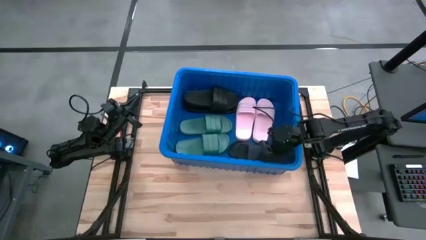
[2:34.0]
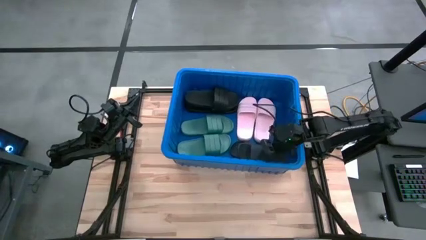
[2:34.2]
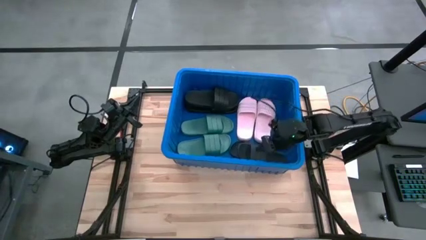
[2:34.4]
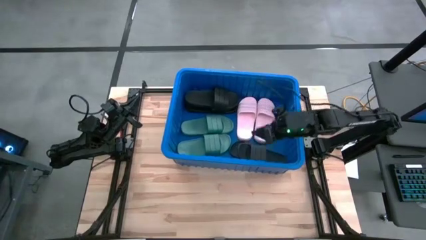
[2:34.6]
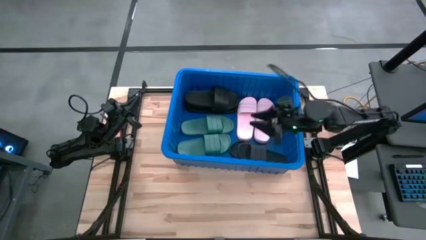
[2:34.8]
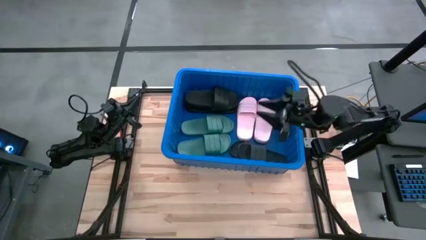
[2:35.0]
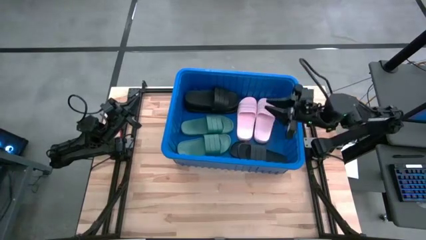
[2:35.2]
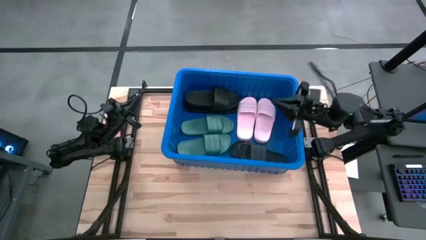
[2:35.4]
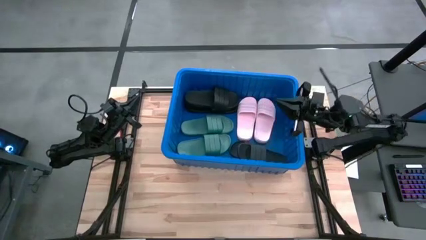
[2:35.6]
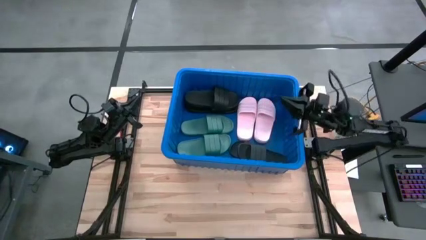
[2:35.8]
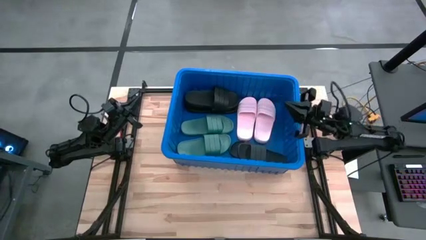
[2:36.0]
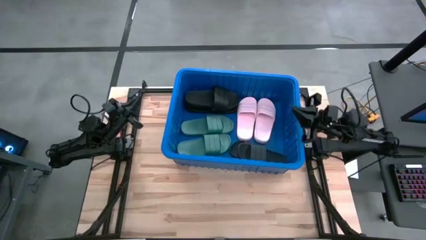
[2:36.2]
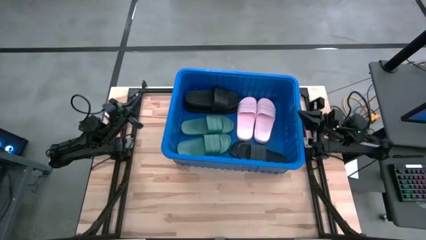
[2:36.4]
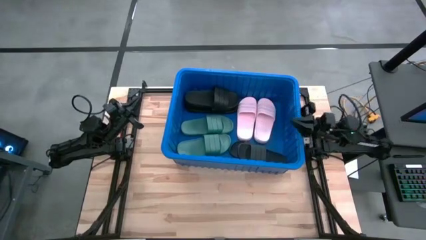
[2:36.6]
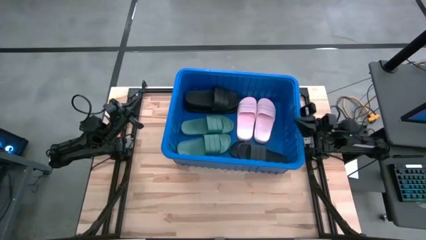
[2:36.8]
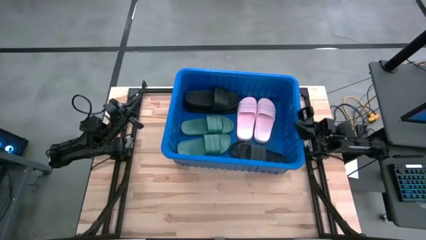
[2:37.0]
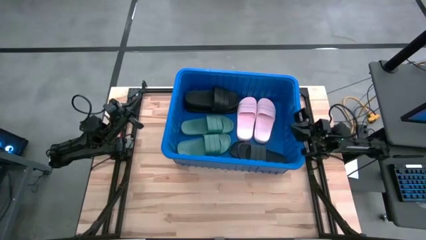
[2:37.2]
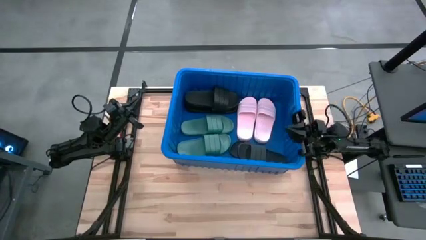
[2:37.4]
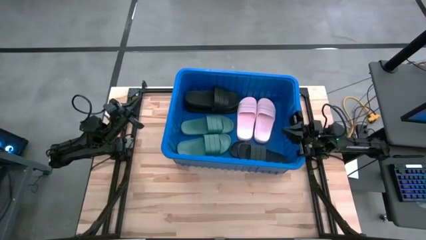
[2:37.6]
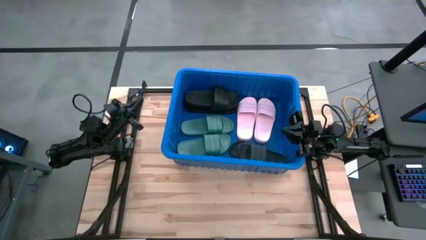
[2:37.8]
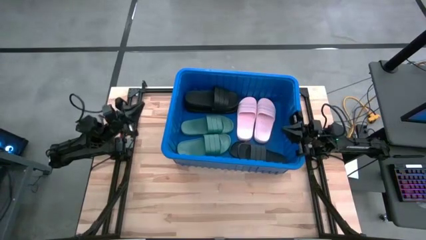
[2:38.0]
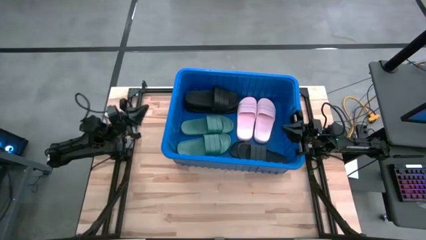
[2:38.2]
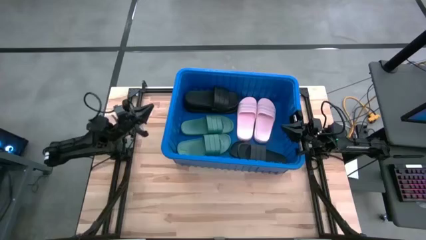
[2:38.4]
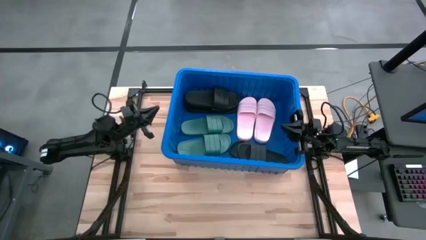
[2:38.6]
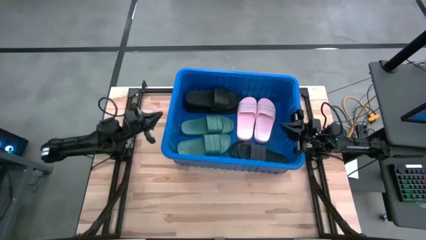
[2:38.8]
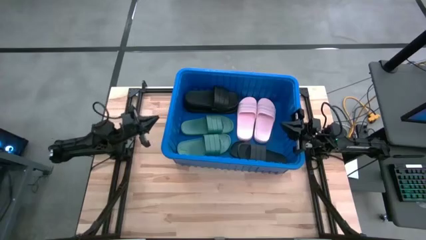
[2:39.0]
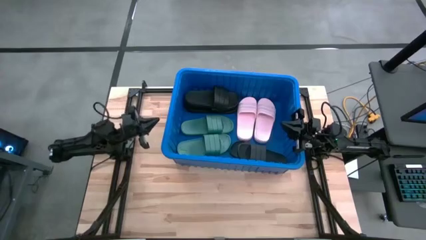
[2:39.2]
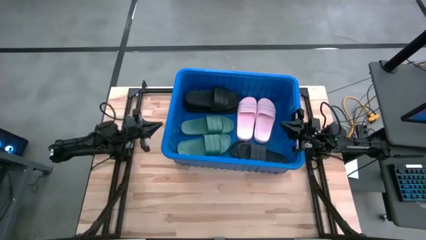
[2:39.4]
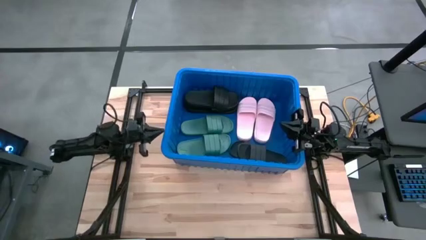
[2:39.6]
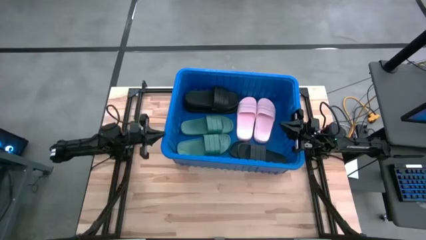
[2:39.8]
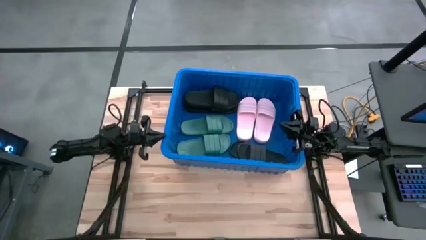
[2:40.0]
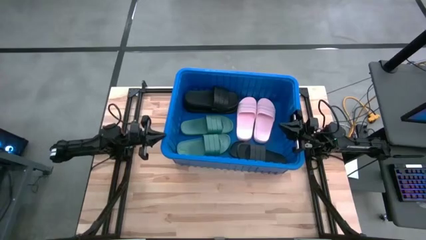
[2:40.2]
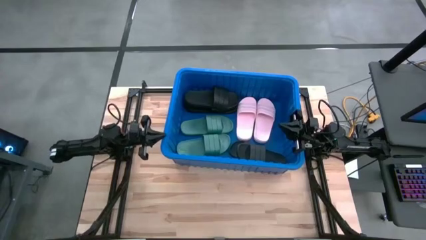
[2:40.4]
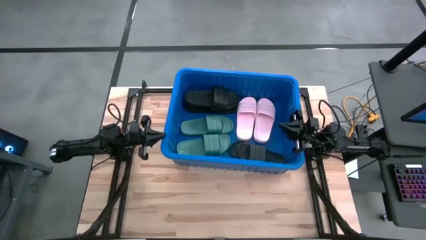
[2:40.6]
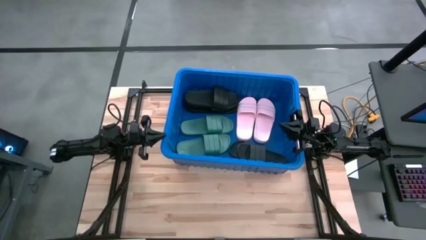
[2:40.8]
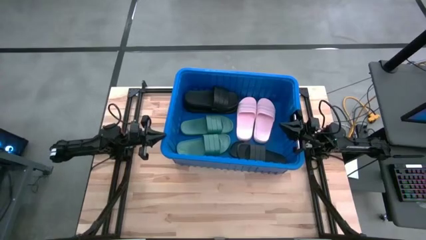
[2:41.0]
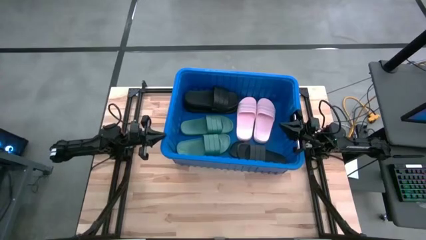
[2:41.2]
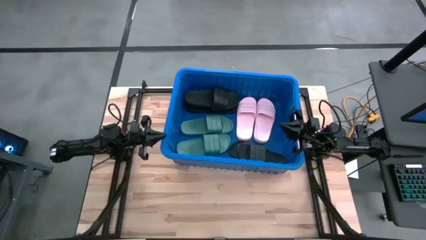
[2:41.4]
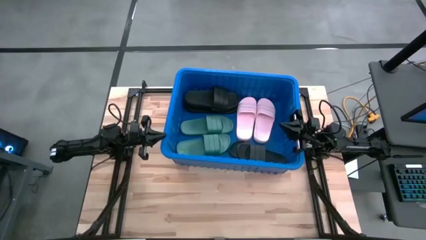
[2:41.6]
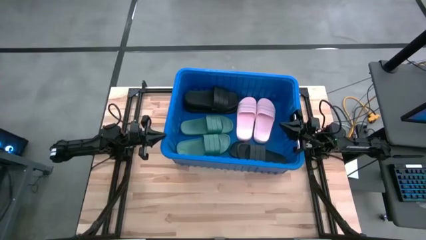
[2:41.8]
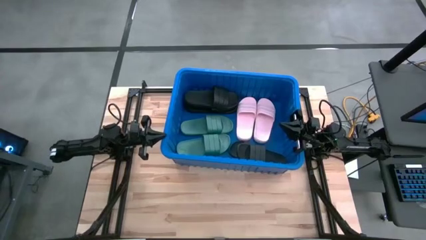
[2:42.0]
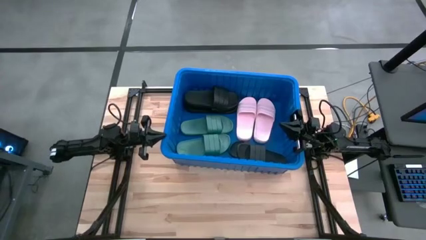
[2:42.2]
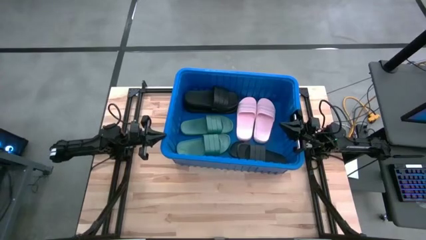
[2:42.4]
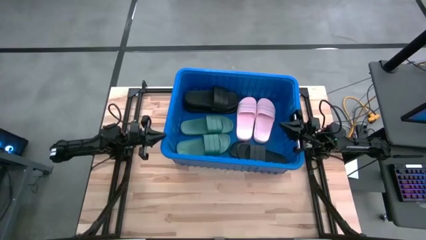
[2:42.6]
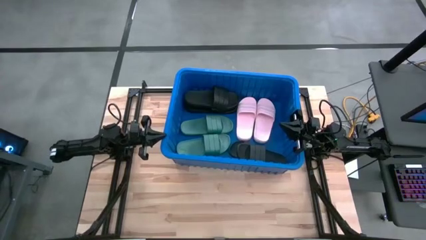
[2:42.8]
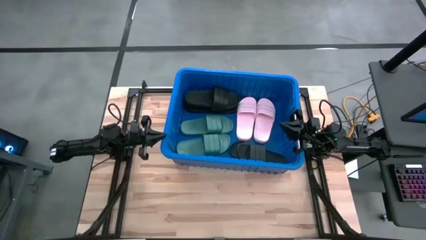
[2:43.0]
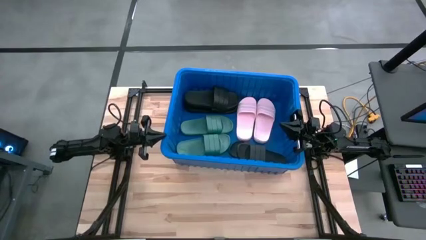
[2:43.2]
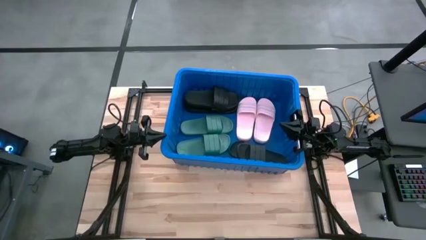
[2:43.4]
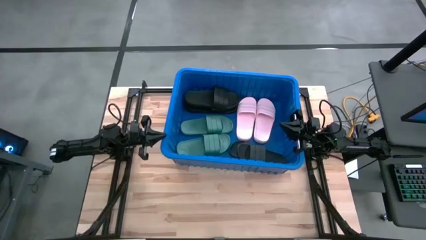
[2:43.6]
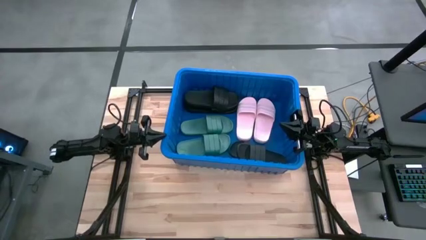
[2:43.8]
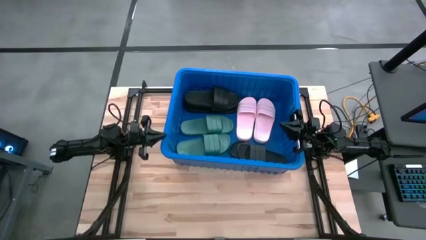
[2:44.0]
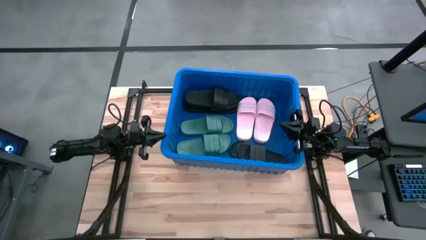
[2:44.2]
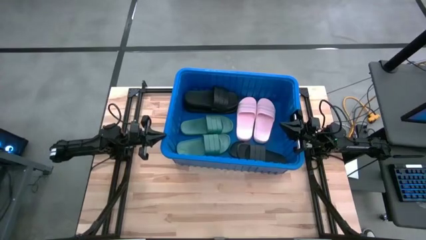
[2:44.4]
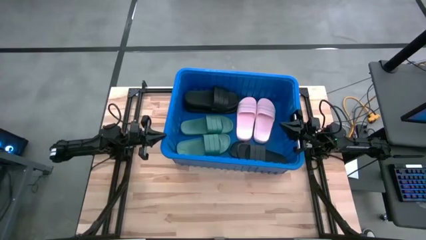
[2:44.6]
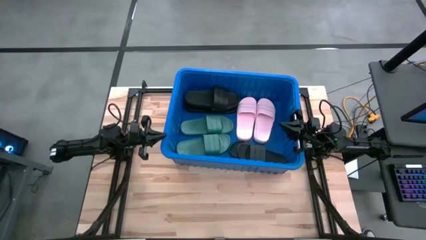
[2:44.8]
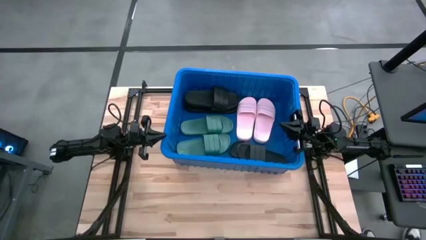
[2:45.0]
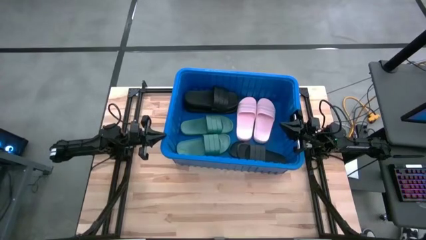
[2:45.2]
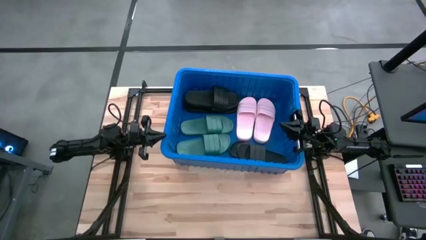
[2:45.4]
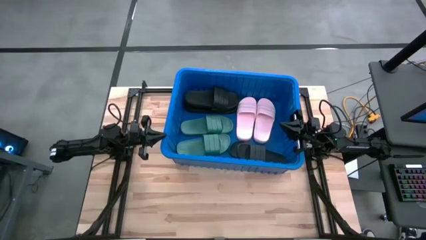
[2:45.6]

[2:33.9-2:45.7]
Task: Pick and place slides into bin
Return to Home Position
